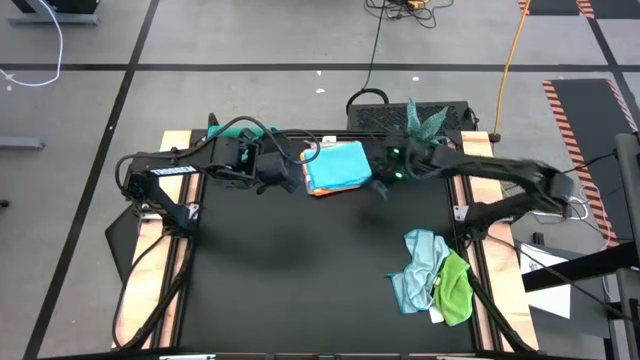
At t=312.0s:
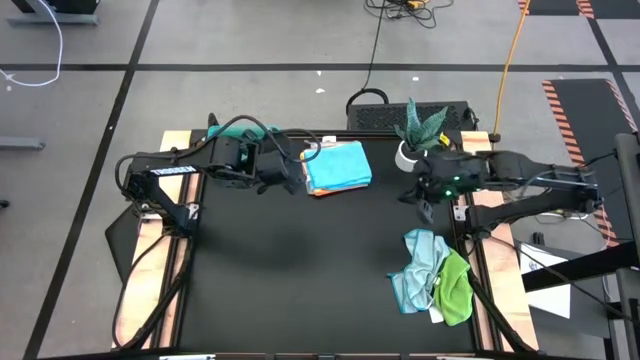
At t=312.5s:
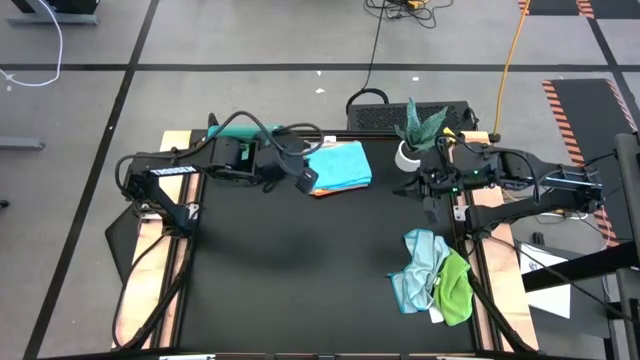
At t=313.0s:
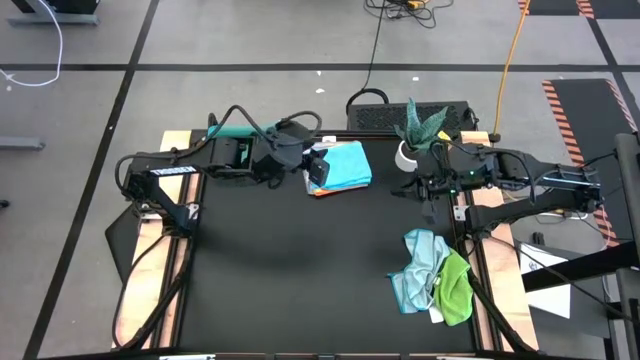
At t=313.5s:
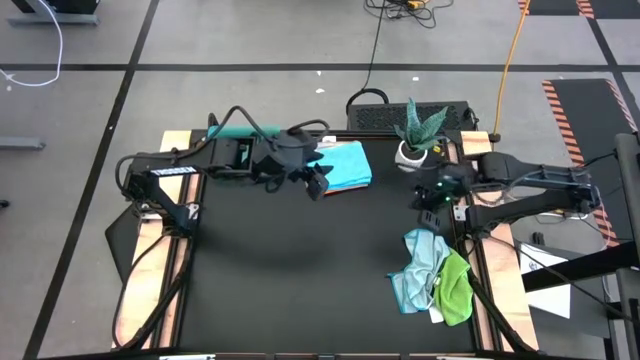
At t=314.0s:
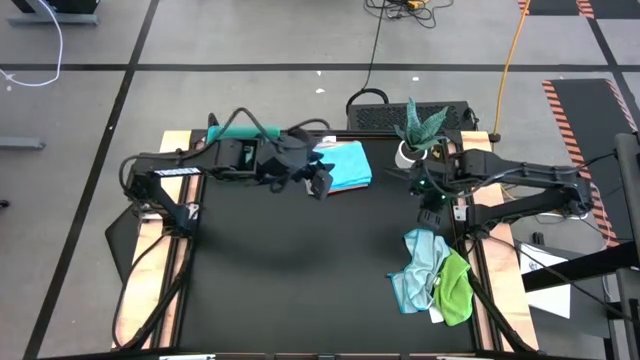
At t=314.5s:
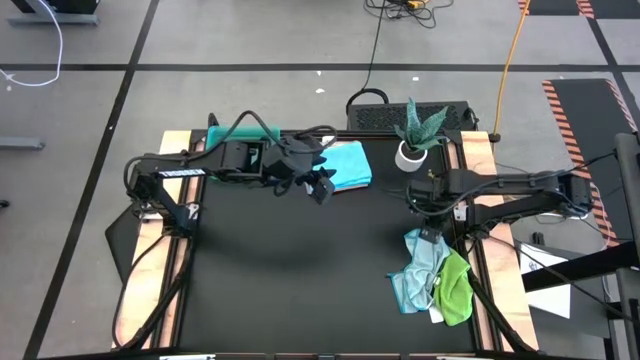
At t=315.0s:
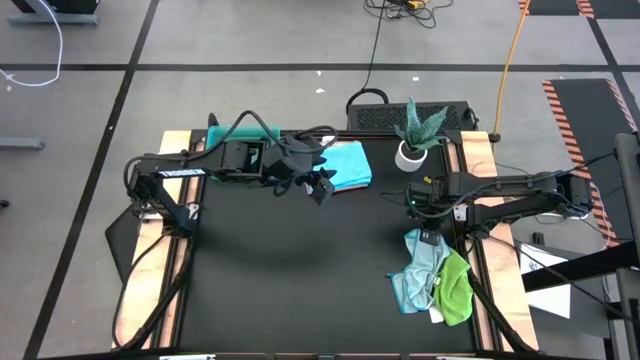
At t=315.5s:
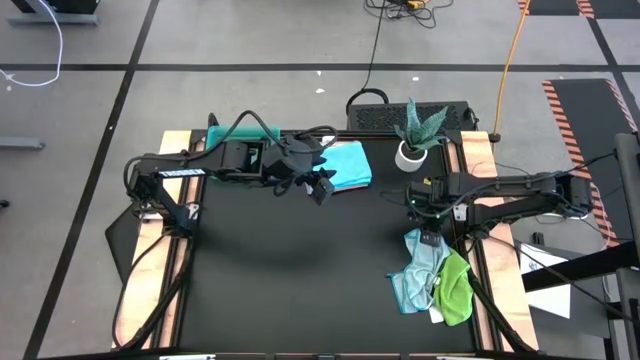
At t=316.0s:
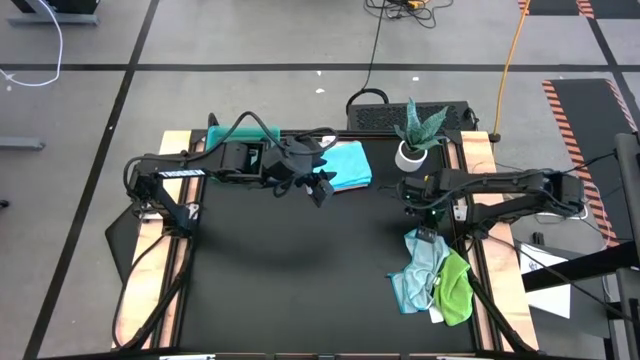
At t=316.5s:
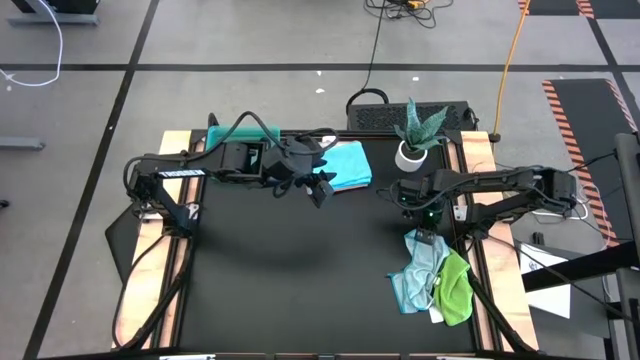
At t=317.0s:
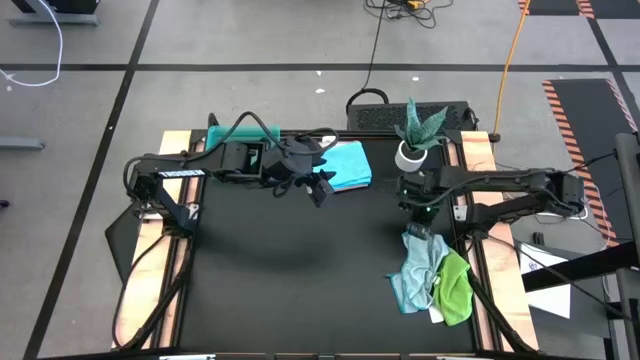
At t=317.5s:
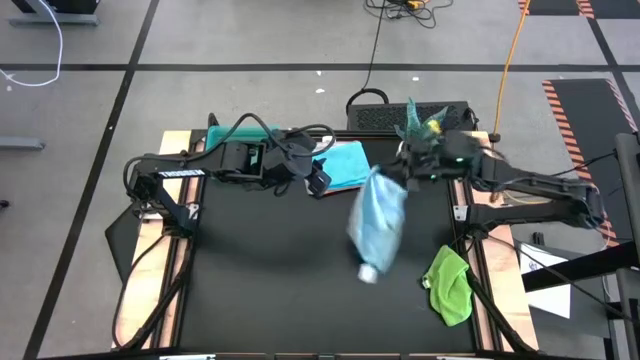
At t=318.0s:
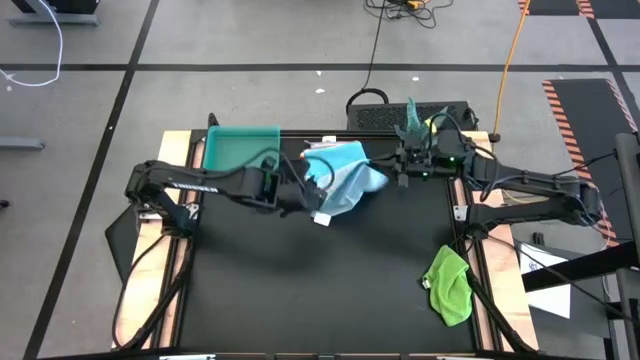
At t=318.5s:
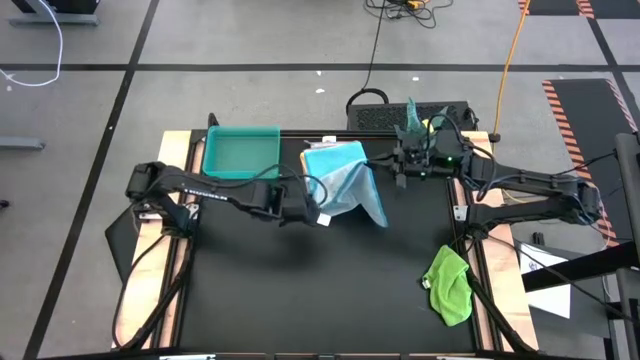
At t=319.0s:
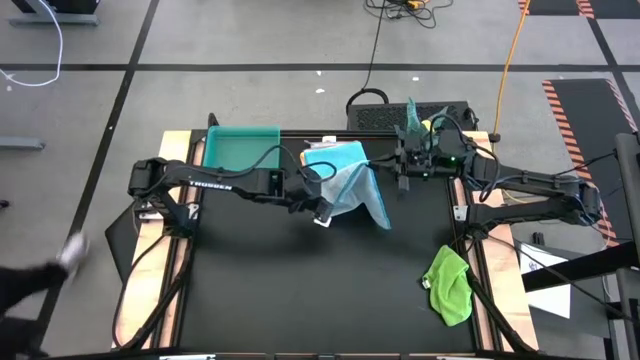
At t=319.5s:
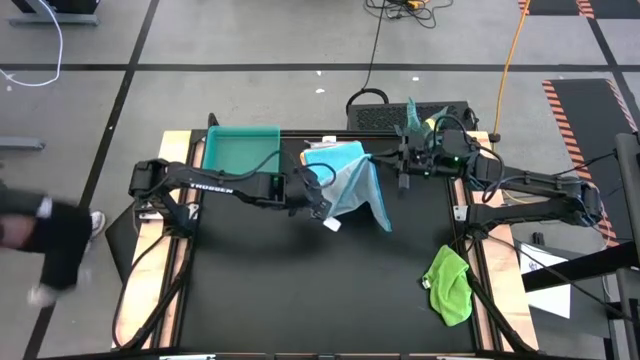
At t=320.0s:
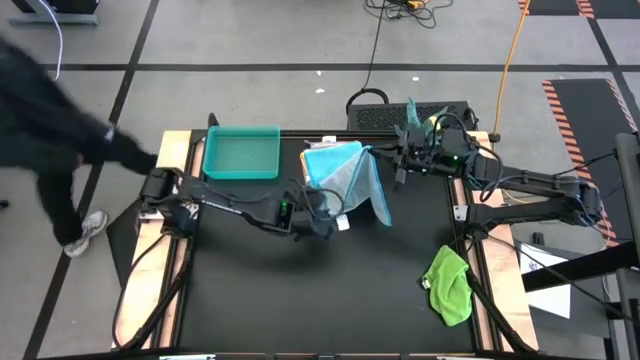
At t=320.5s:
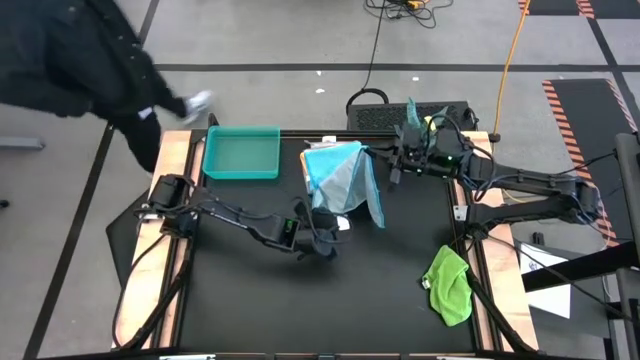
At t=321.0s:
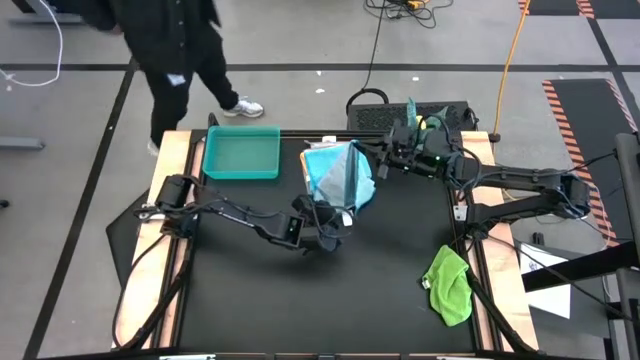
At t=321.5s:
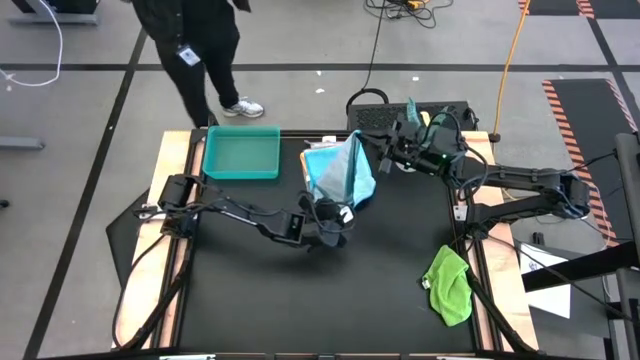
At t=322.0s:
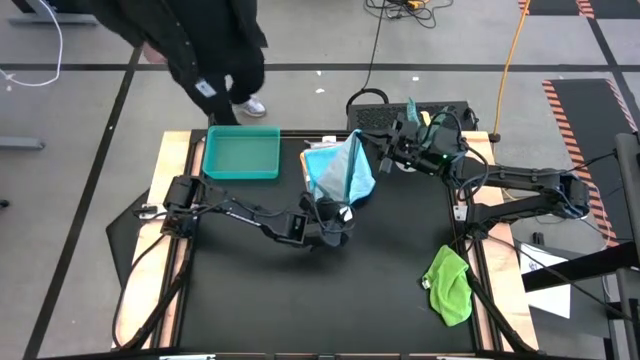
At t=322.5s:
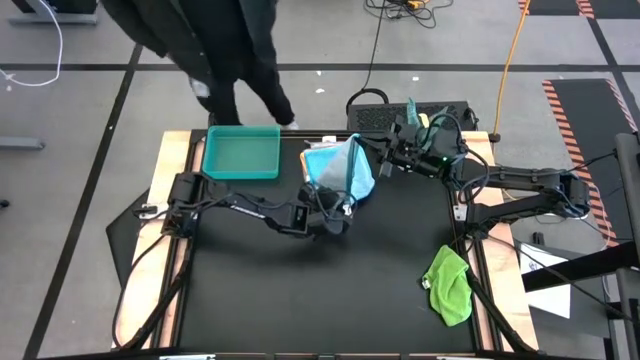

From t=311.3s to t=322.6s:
Task: Fold microfiber towels
Fold the light blue microfiber towel

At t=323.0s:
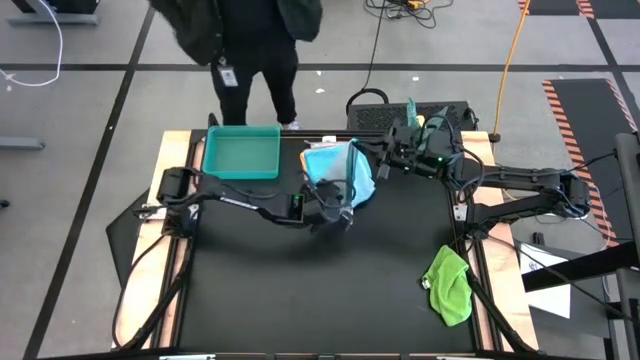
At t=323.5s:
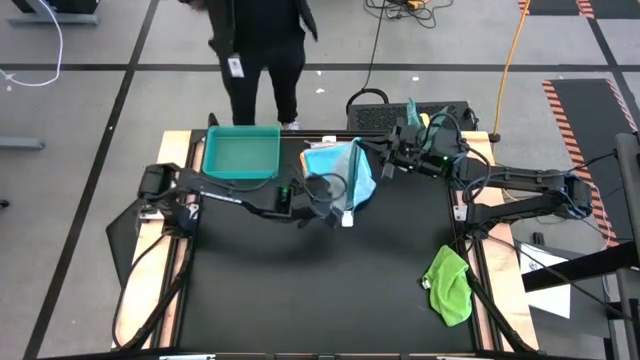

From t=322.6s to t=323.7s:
Fold the light blue microfiber towel

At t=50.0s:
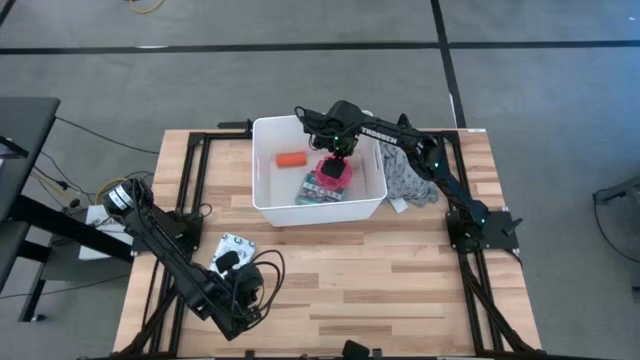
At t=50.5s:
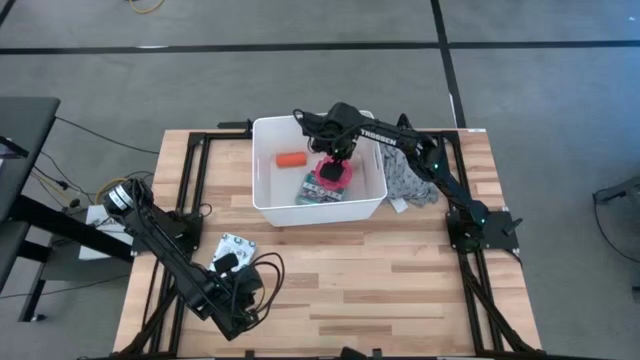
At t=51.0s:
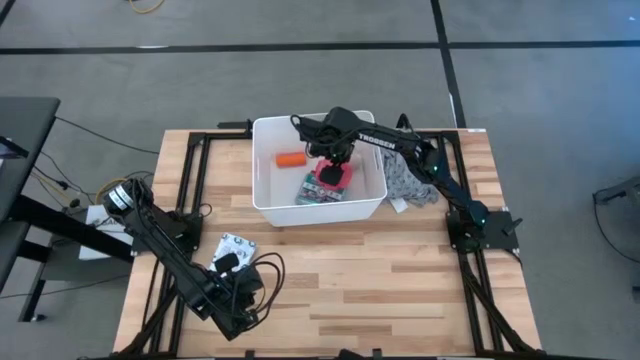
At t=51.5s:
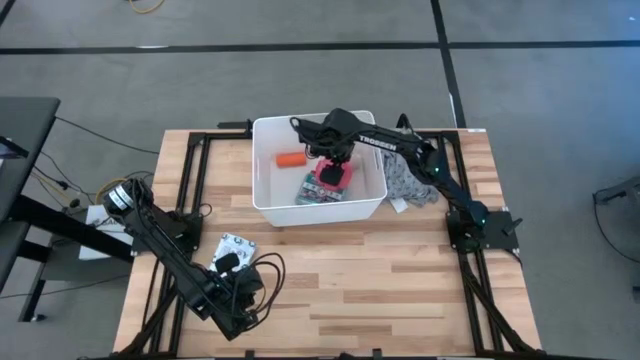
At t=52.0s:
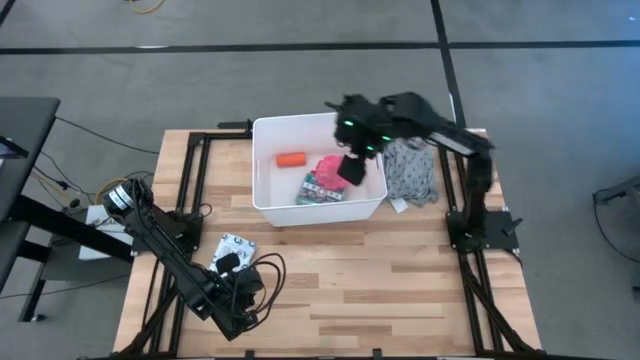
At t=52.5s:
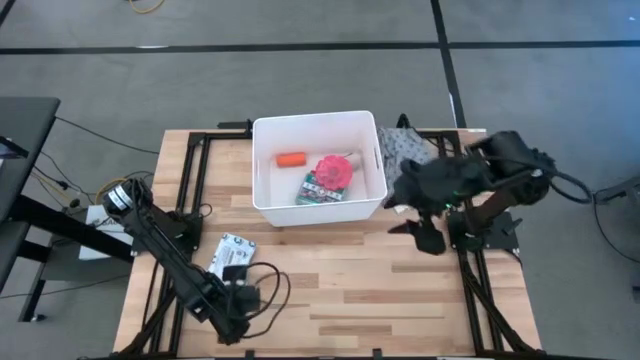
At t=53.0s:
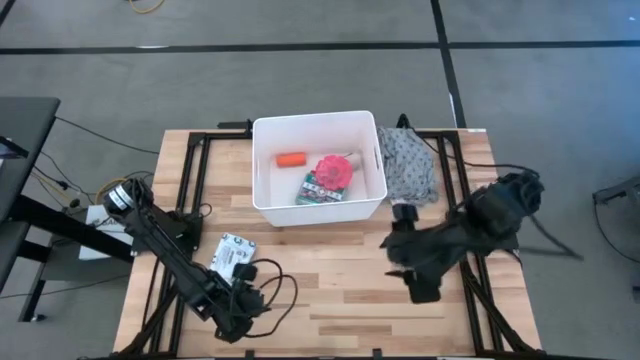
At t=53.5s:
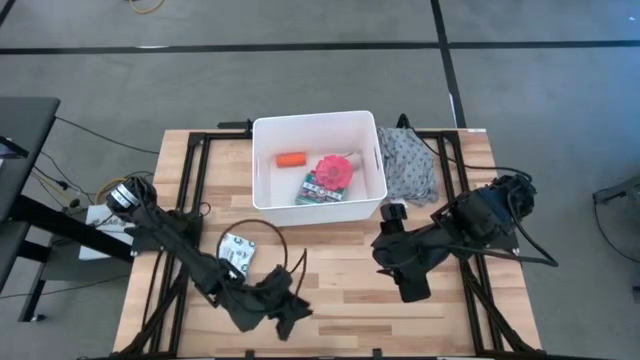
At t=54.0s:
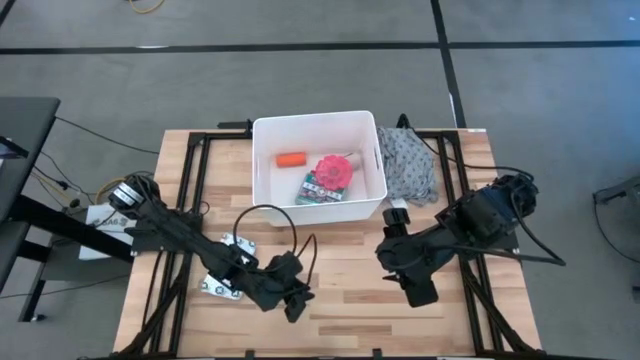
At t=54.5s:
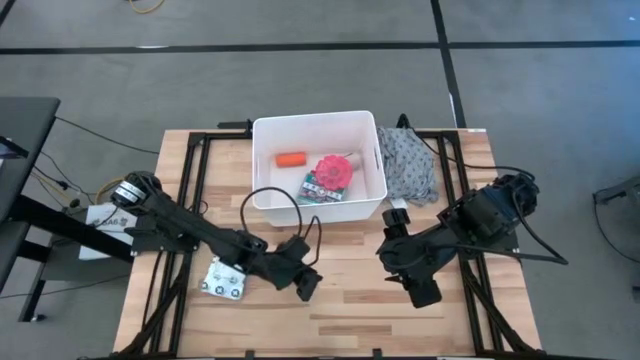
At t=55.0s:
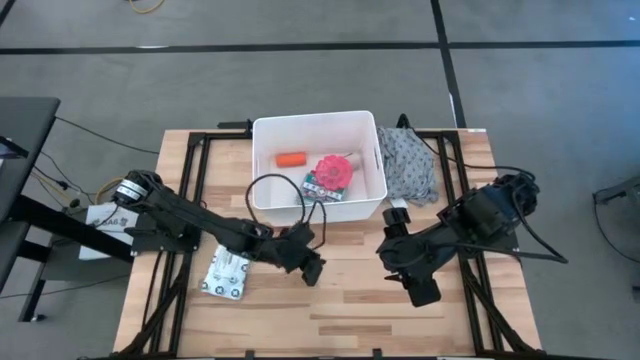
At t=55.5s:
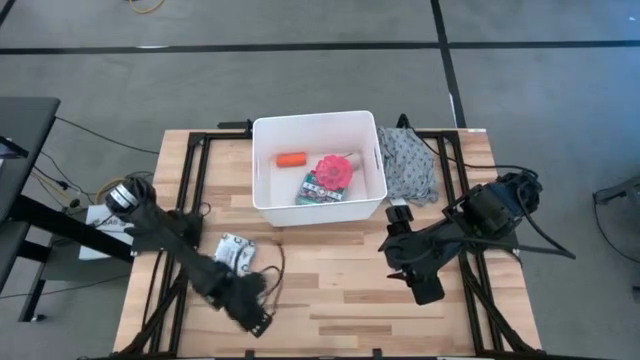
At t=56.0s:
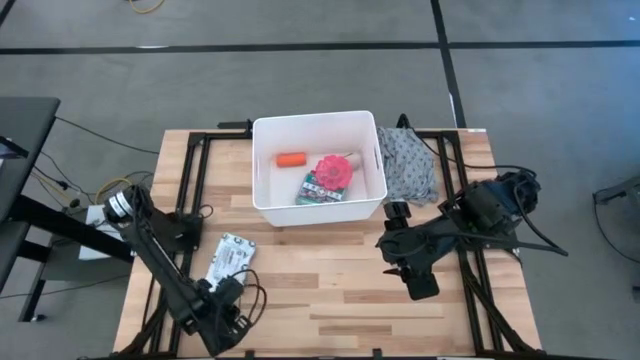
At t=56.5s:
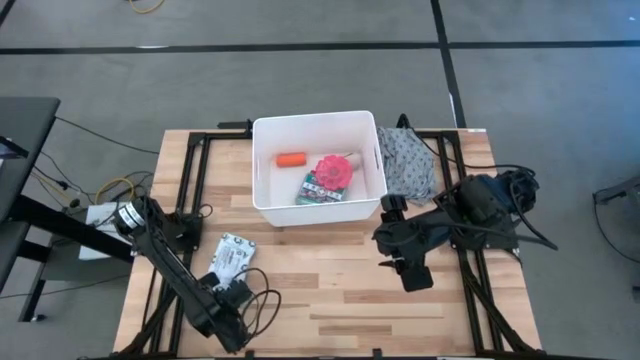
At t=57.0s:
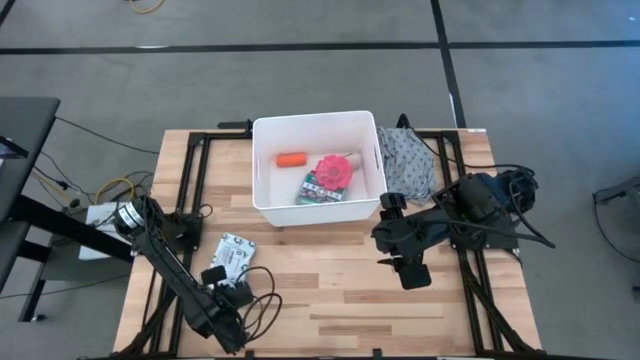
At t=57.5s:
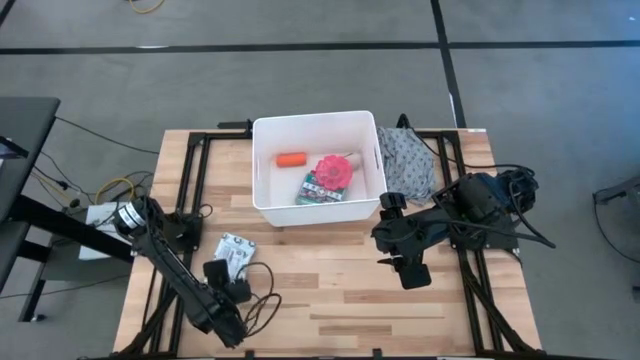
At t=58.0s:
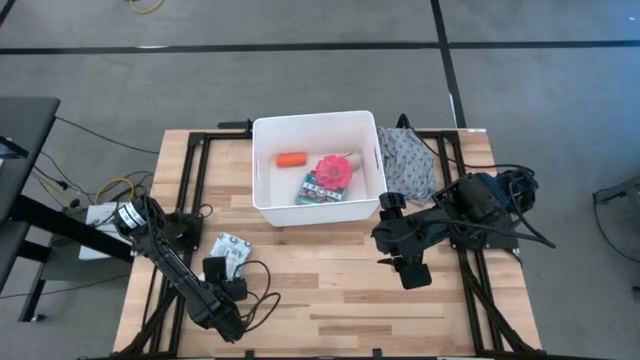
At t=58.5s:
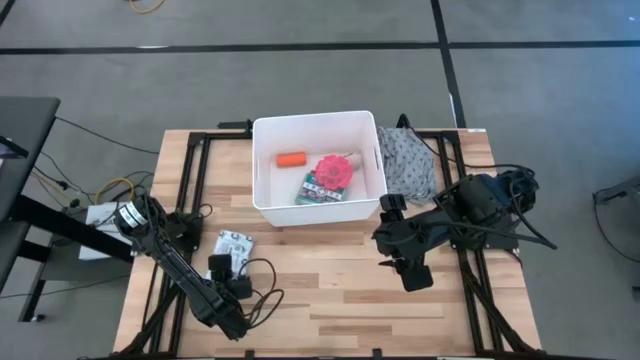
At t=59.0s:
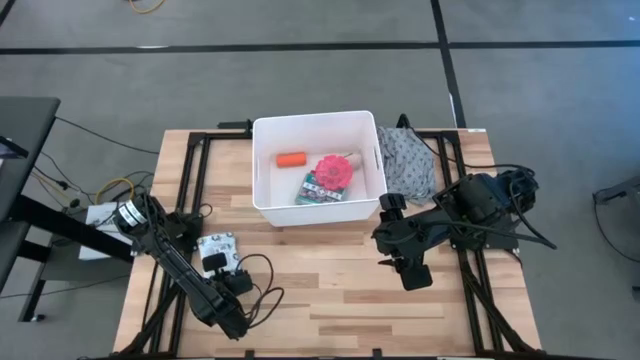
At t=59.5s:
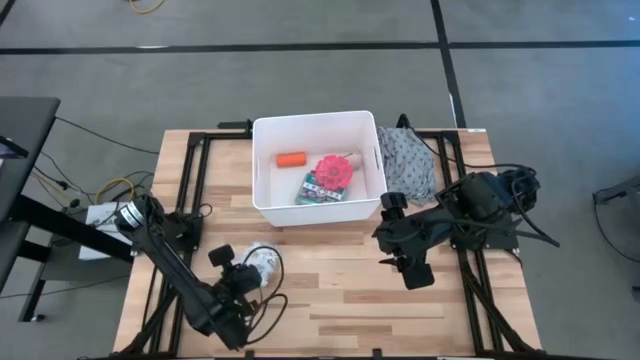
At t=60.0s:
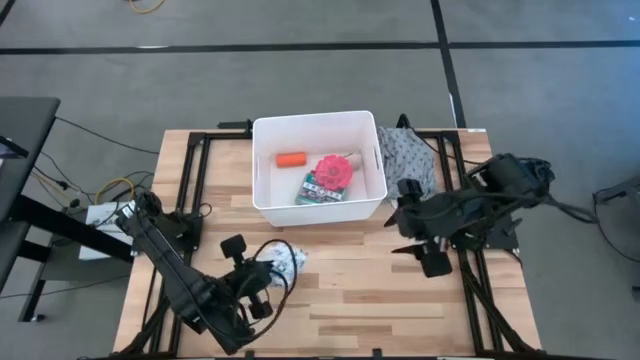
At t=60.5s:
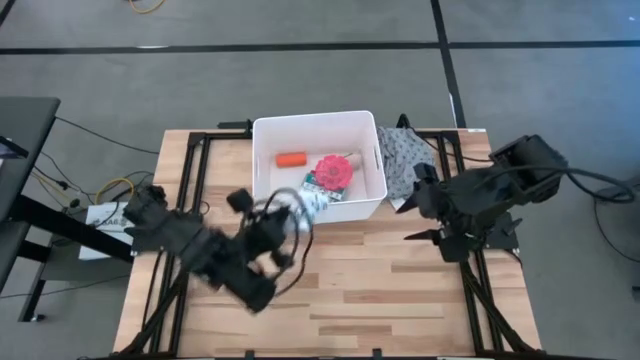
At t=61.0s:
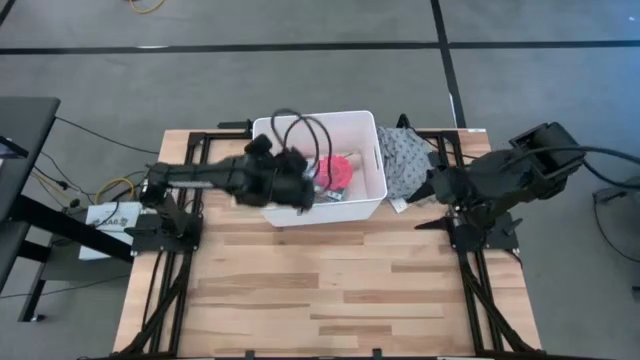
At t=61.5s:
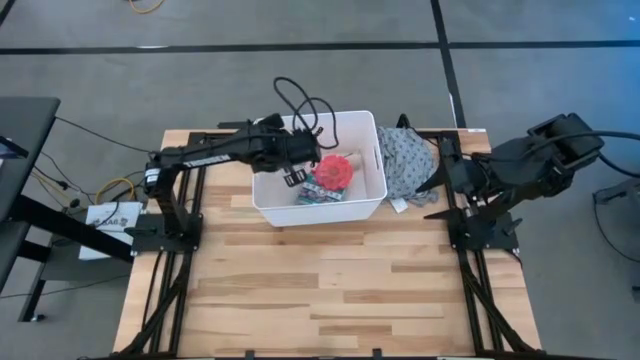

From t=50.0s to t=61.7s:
Task: Pick & place medical supplies in basket/bin
Put the mailer bag into the white bin
